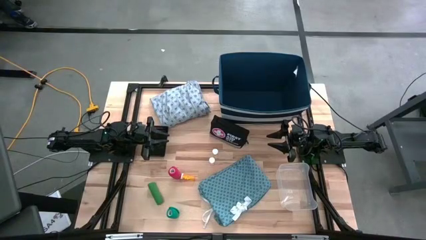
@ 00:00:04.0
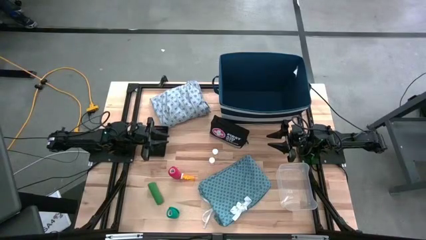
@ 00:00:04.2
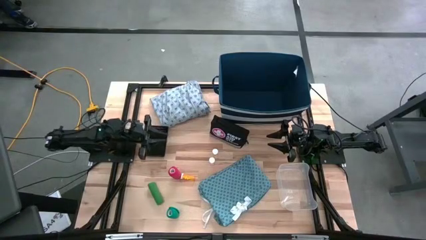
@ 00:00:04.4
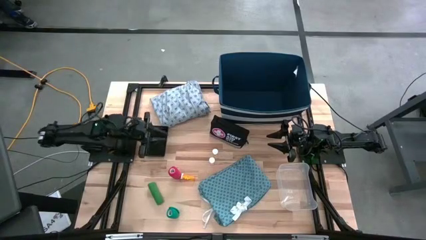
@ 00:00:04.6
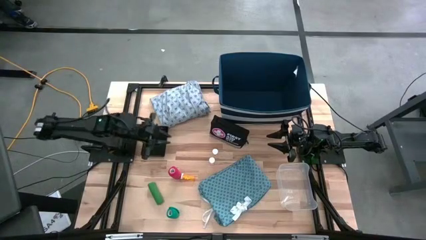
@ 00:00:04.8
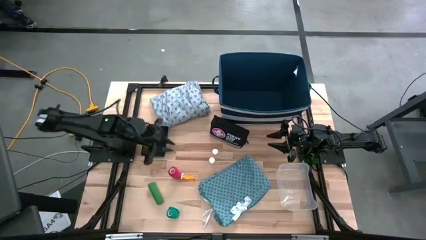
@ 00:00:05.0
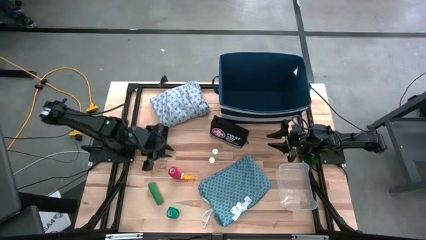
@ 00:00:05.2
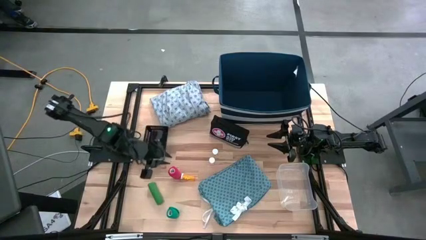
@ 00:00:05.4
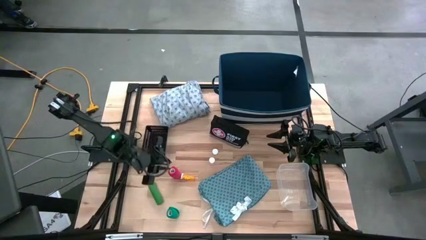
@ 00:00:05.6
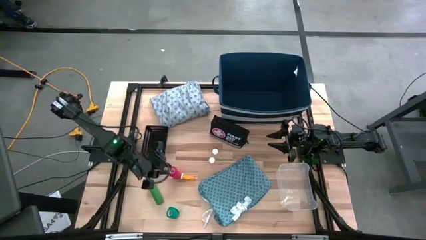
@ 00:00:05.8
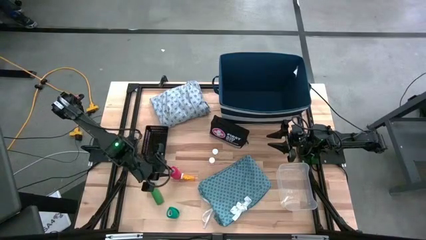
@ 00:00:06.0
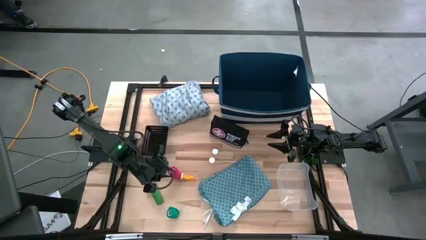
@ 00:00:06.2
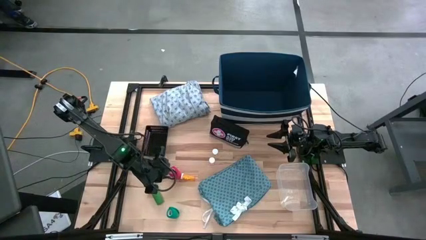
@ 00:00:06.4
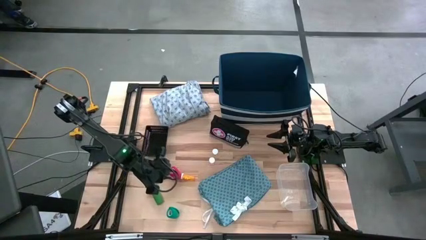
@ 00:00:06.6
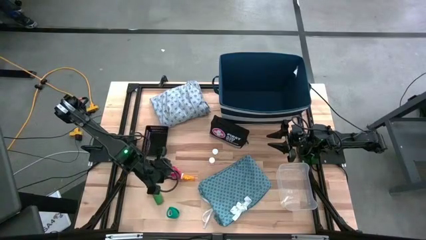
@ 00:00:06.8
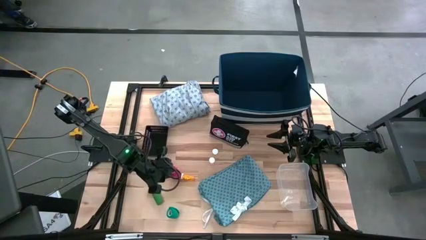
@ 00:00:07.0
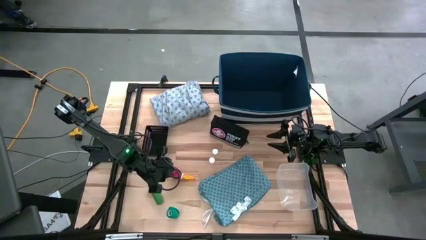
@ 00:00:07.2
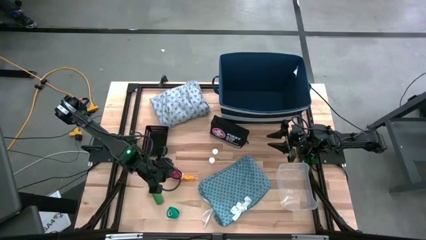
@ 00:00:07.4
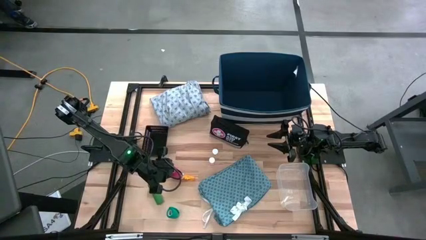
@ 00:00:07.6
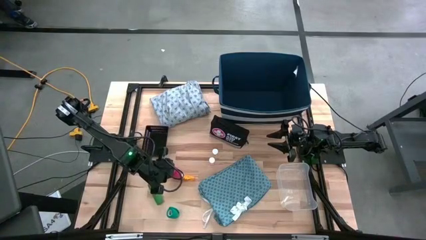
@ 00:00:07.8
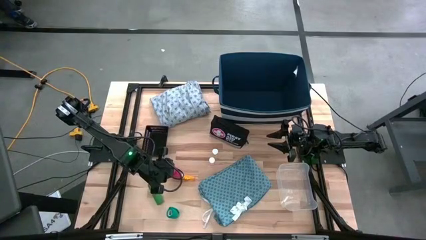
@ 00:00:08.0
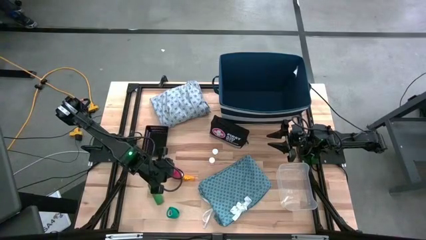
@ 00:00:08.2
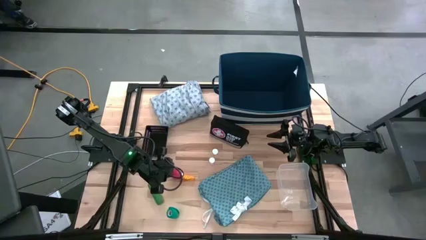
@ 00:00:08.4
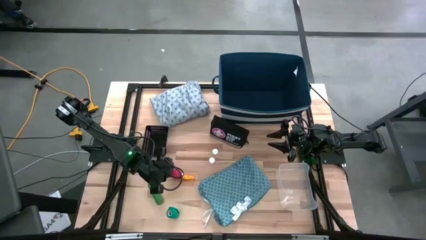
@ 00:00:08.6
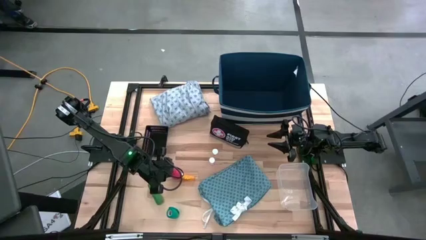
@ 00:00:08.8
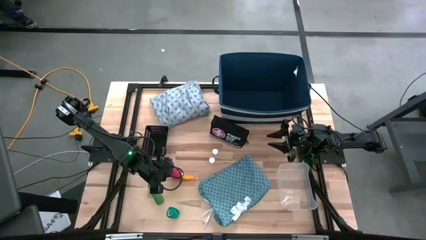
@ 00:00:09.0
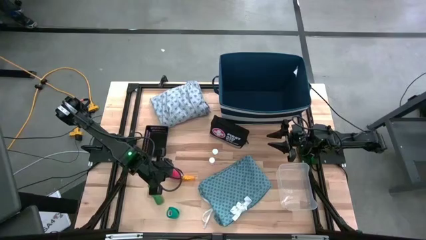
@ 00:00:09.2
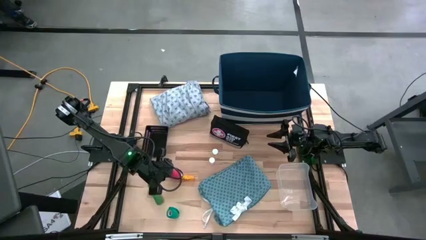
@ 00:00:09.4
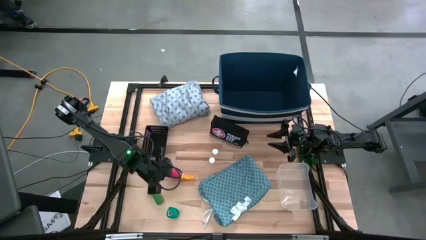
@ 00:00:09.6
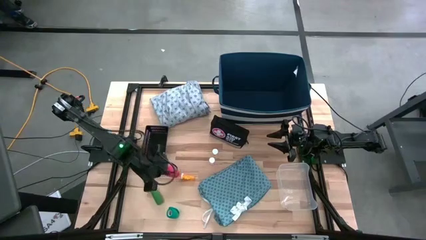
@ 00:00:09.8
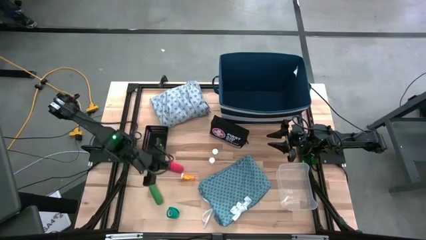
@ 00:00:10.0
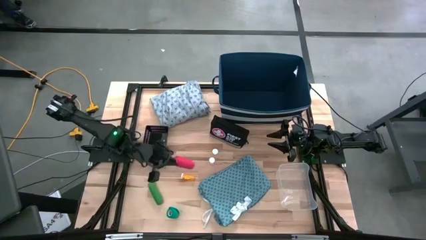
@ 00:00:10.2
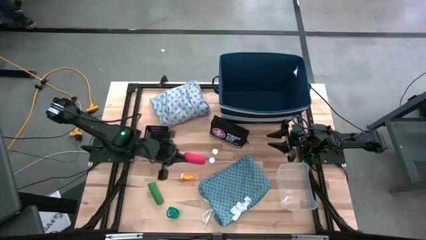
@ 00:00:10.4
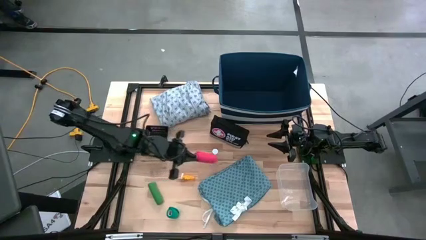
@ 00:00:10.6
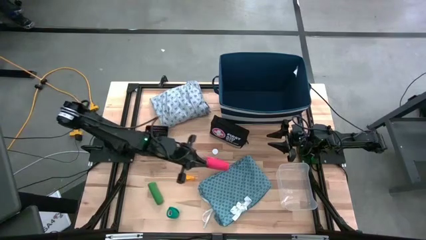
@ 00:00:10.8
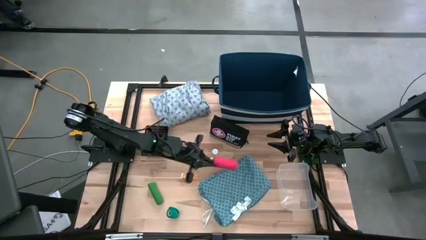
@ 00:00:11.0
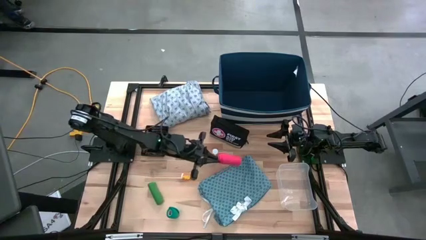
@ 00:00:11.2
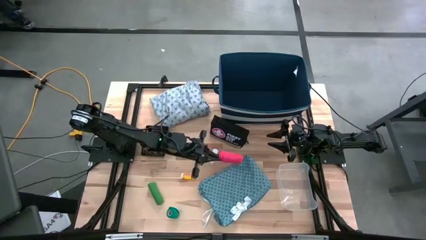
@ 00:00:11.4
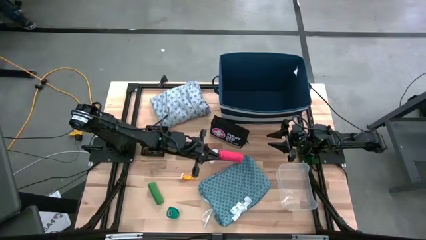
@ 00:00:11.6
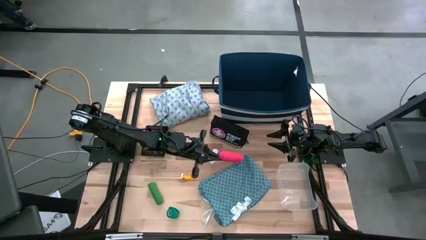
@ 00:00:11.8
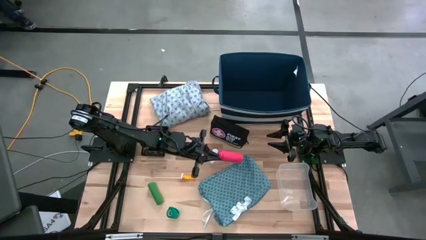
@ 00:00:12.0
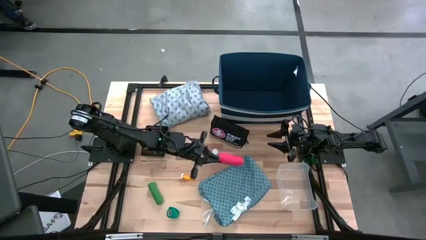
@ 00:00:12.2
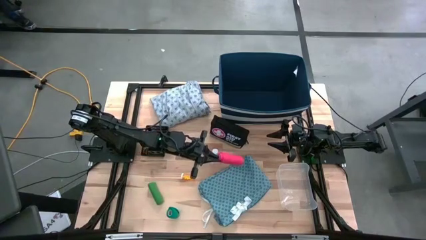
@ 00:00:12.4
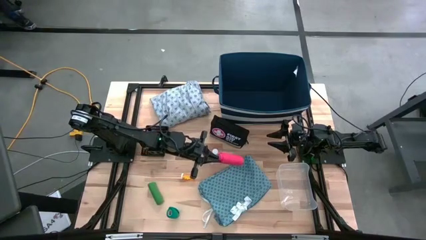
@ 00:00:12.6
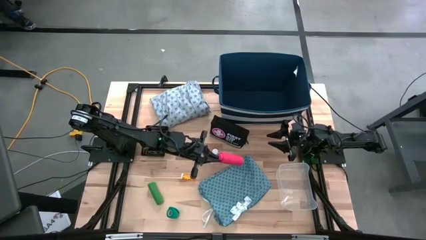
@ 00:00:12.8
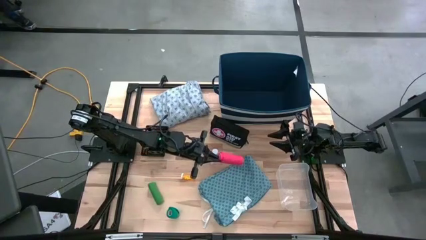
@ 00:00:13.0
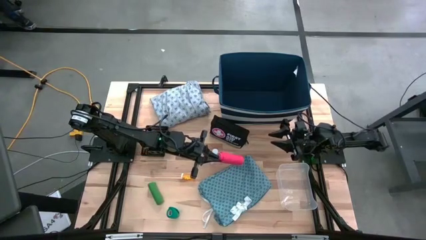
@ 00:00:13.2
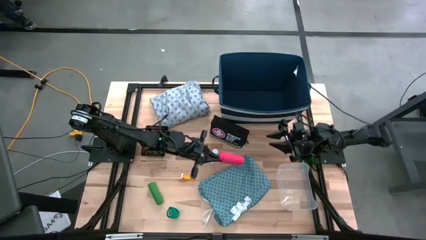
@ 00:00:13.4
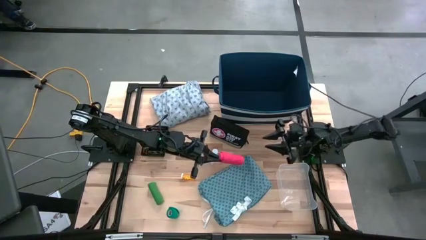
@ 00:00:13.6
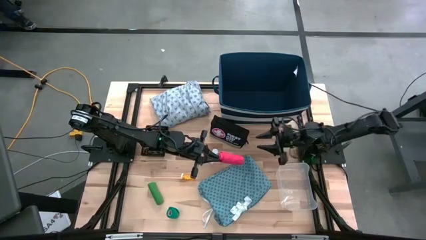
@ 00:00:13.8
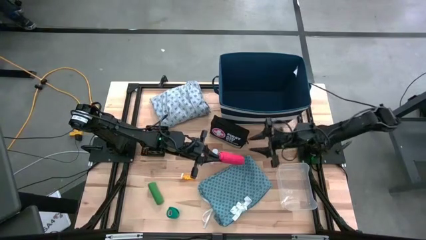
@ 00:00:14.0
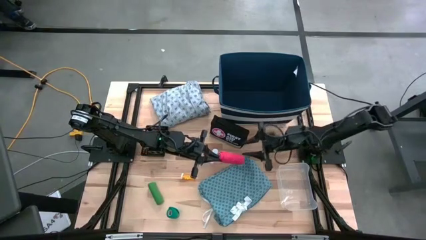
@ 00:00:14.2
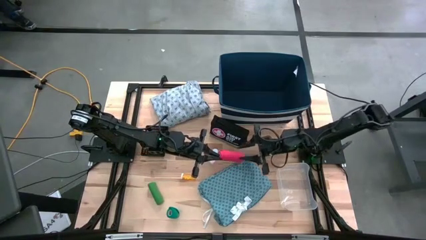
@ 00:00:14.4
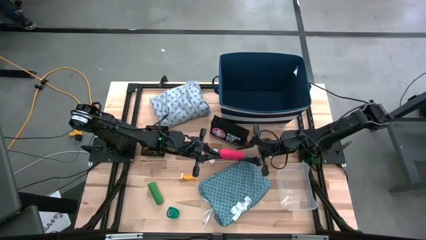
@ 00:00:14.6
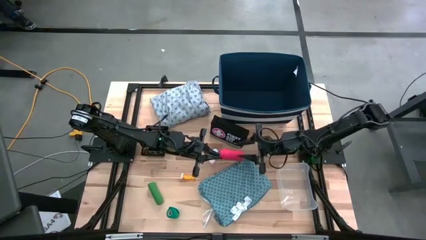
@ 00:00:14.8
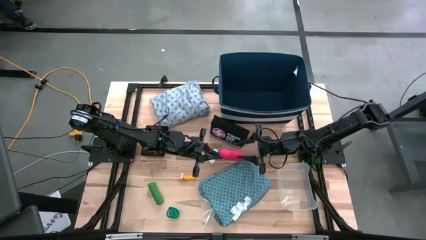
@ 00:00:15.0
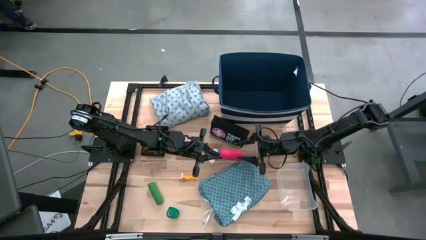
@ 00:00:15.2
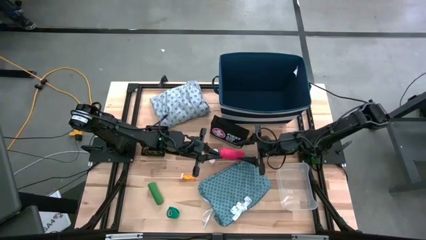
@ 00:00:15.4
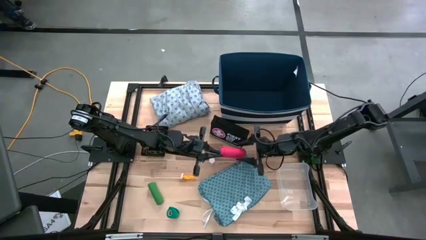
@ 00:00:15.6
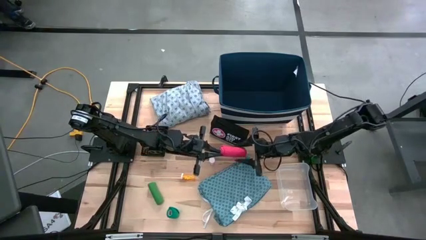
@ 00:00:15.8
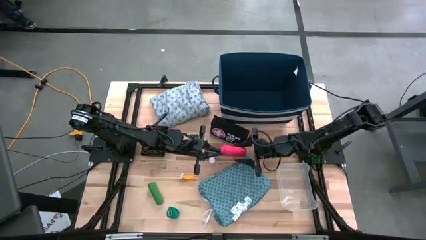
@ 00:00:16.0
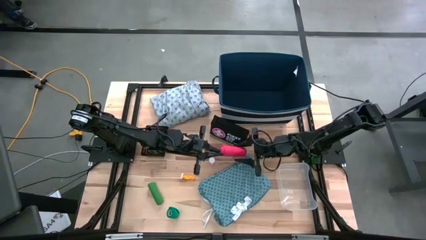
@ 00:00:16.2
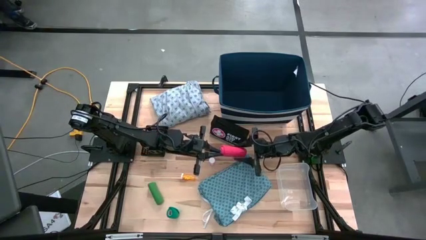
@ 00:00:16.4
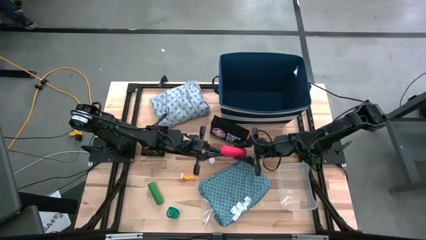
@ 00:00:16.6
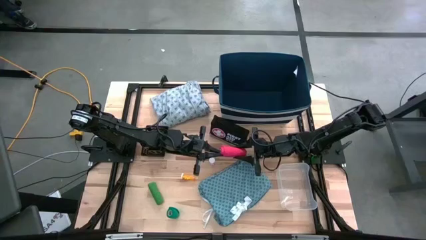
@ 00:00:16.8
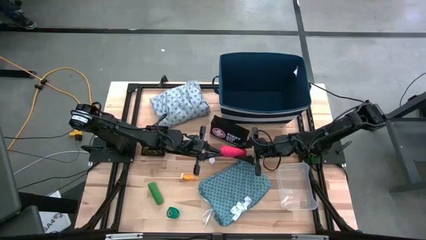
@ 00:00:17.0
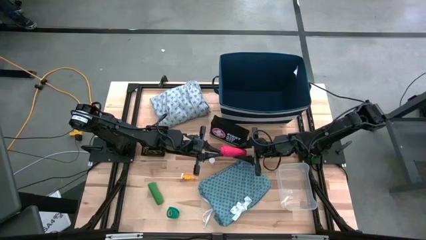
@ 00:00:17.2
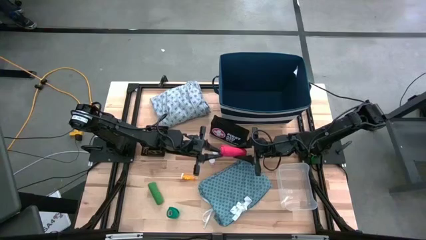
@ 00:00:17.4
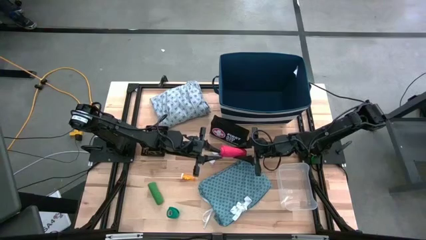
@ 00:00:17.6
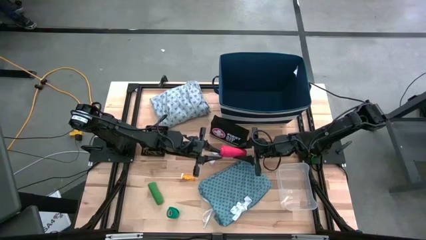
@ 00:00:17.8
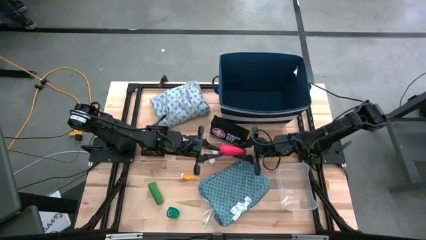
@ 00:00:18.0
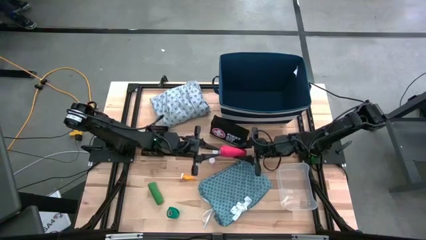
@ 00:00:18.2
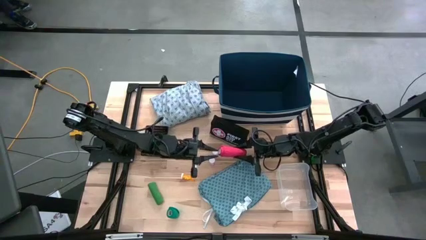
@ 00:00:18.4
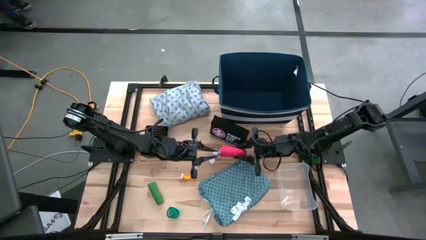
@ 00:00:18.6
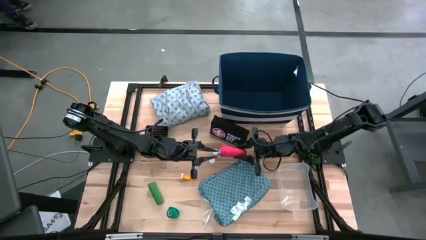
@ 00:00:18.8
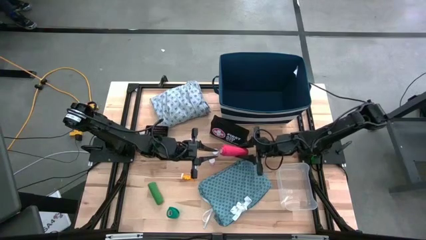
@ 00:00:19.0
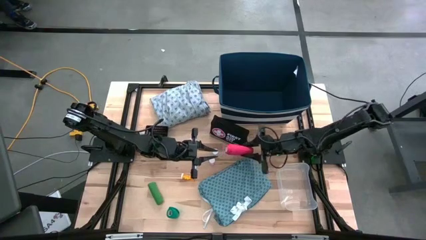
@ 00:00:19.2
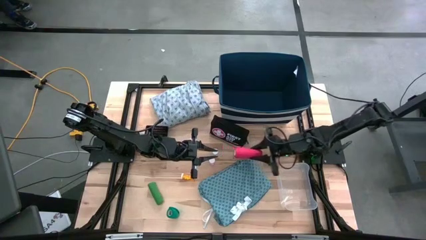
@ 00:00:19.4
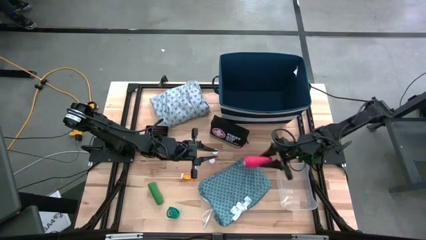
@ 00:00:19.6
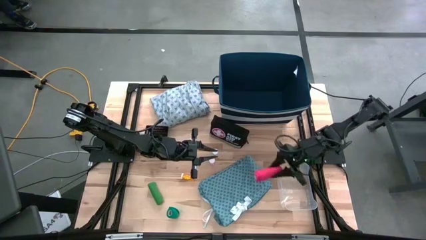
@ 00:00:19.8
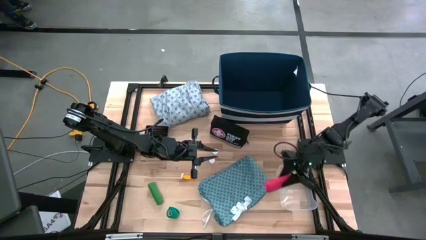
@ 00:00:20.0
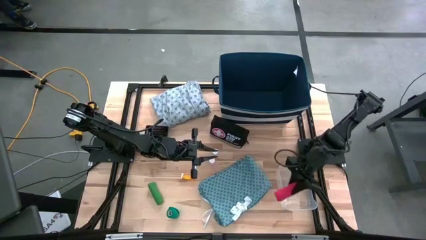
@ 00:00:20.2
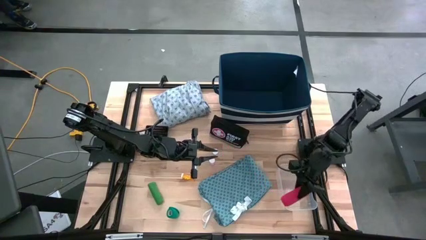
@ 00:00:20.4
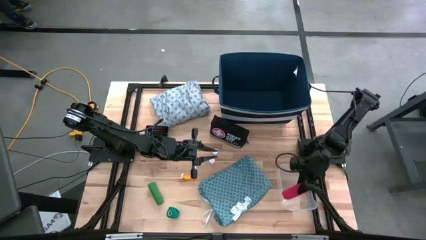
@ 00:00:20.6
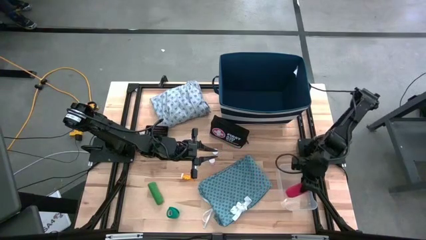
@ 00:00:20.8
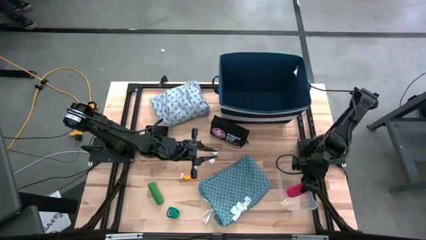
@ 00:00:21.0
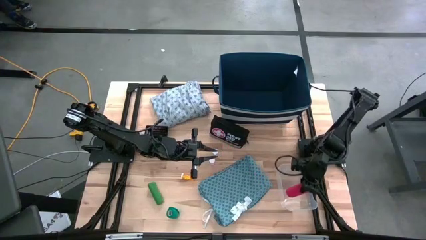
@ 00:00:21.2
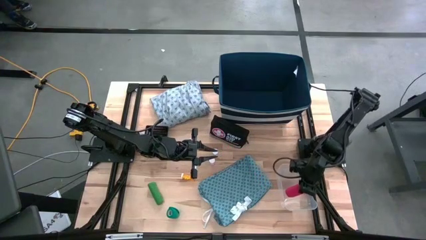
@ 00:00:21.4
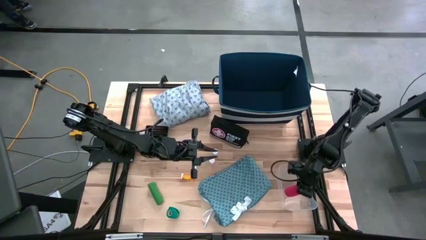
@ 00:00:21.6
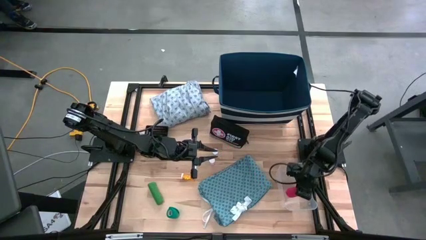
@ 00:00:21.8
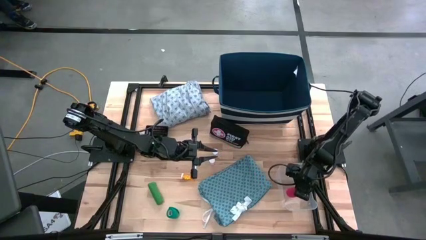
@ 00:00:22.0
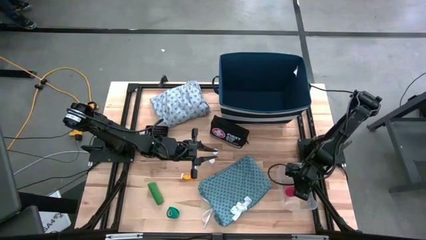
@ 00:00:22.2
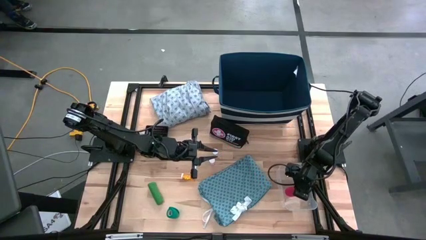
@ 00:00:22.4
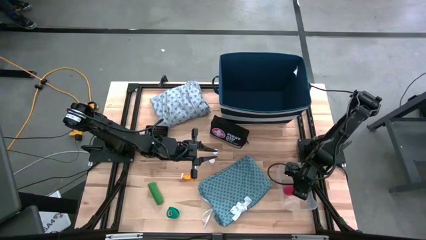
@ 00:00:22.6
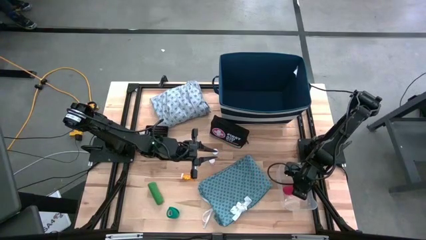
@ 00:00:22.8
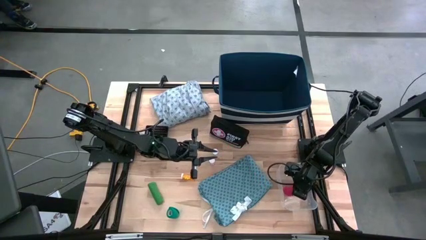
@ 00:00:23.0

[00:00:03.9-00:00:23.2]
Task: Pick & place medical supplies in basket/bin
Put the red bandage into the transparent bin
